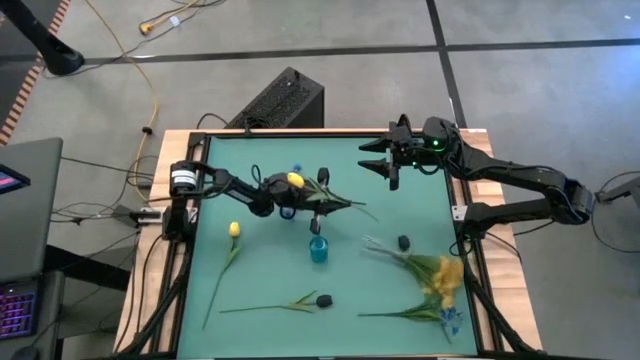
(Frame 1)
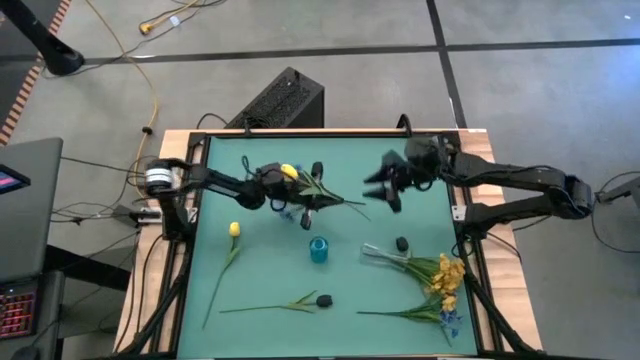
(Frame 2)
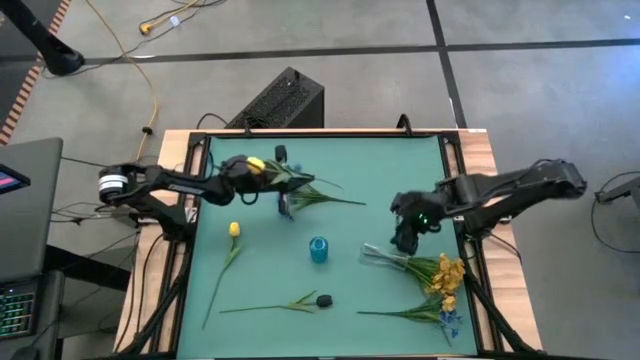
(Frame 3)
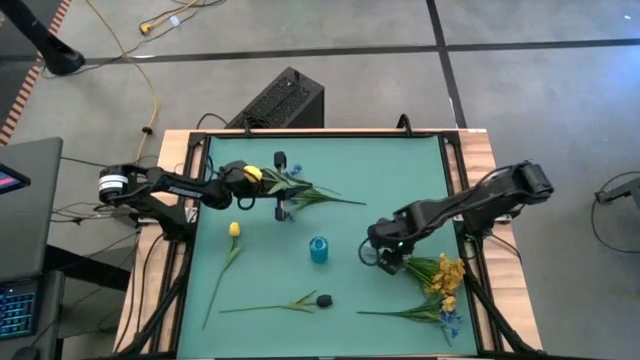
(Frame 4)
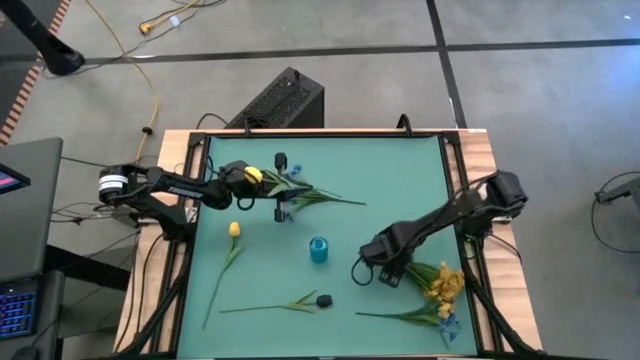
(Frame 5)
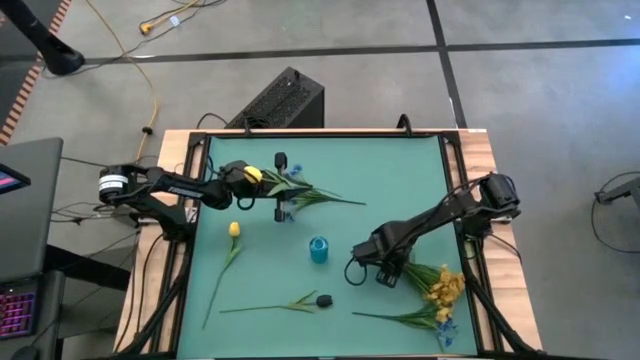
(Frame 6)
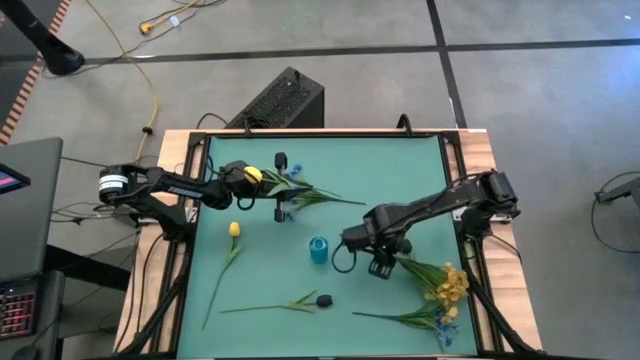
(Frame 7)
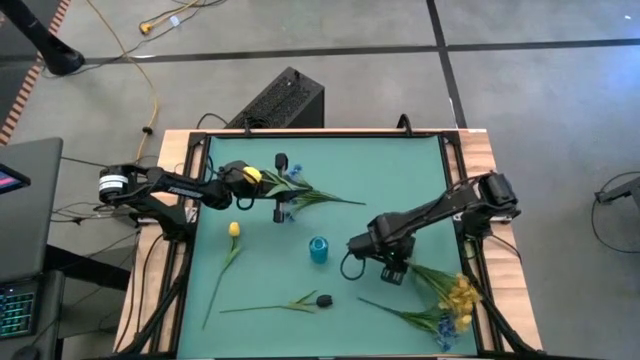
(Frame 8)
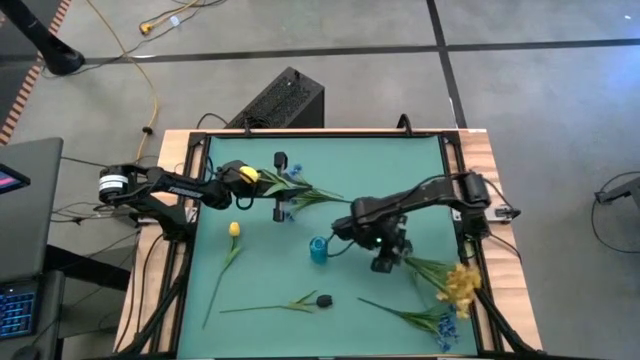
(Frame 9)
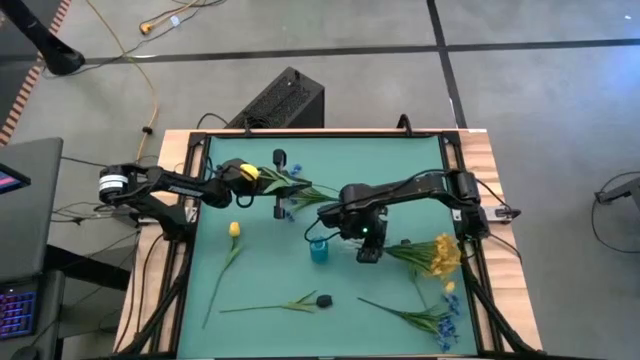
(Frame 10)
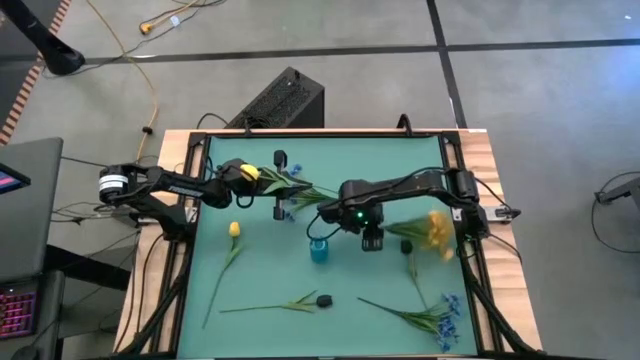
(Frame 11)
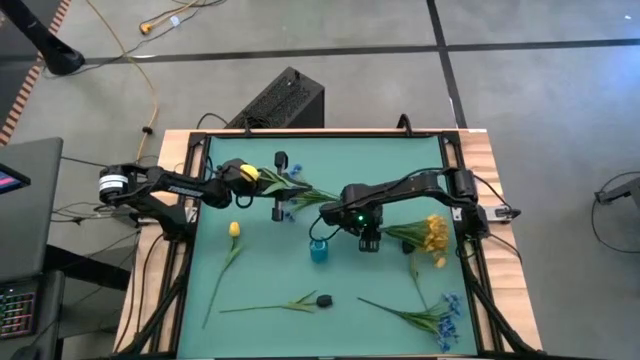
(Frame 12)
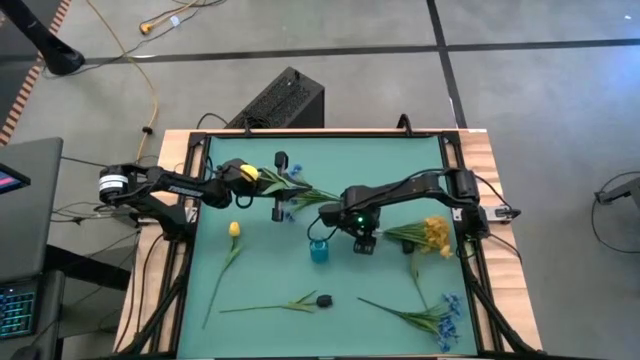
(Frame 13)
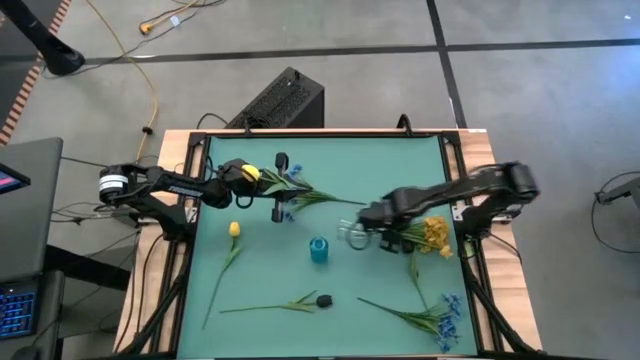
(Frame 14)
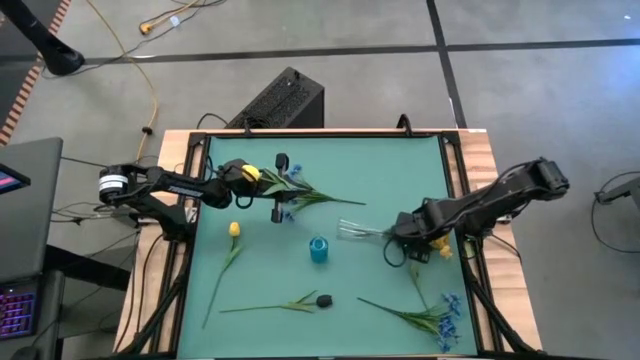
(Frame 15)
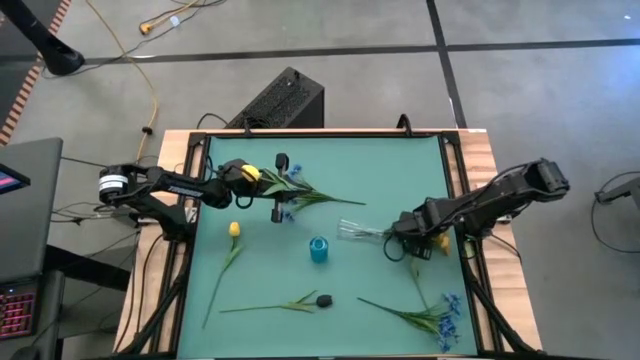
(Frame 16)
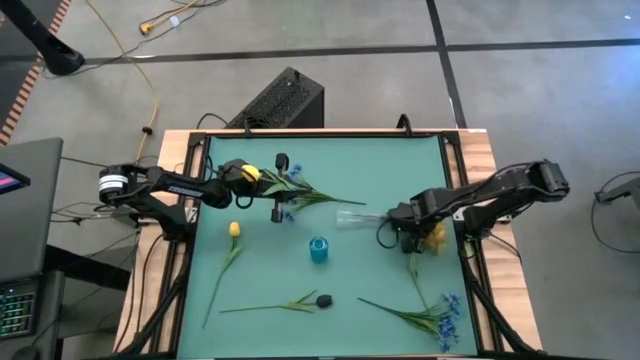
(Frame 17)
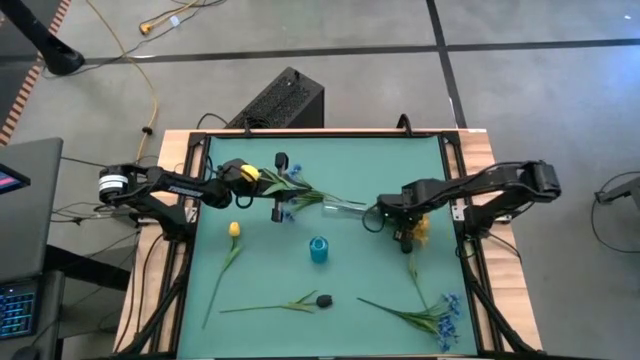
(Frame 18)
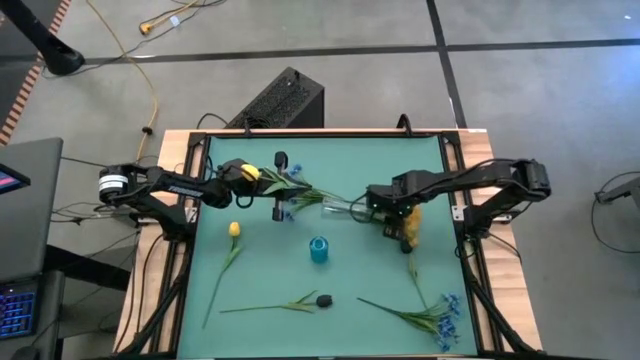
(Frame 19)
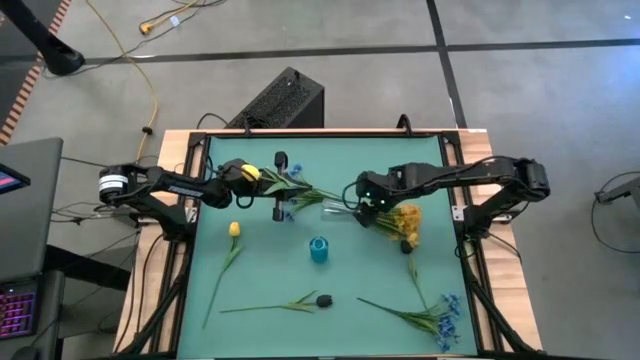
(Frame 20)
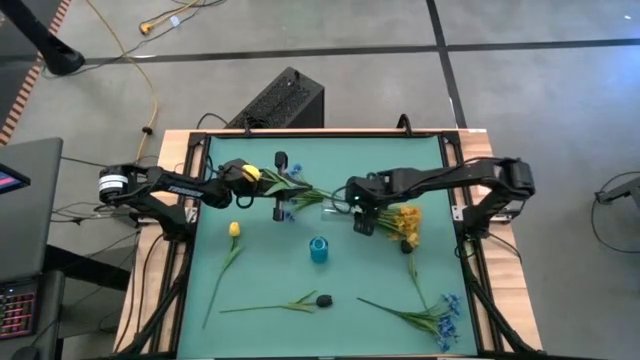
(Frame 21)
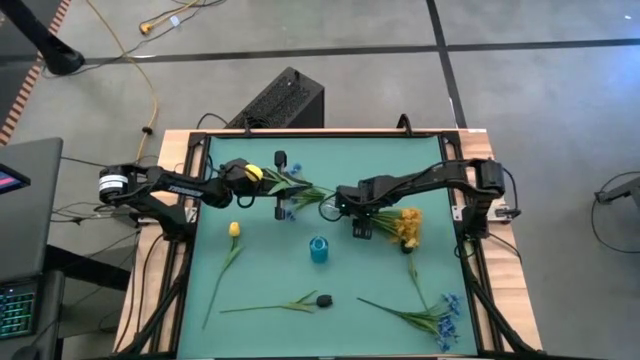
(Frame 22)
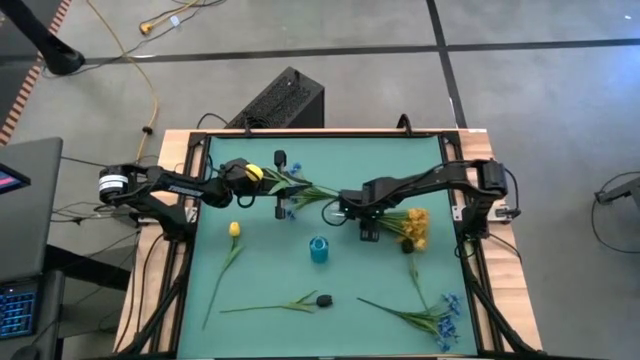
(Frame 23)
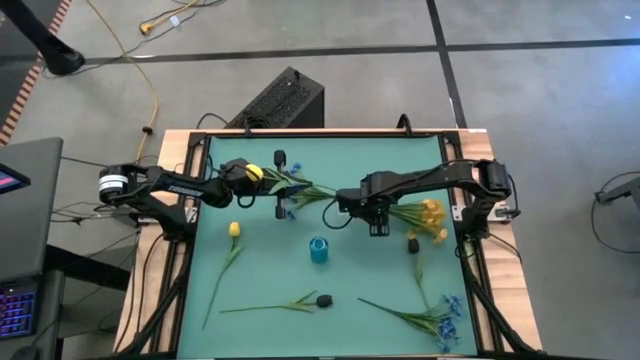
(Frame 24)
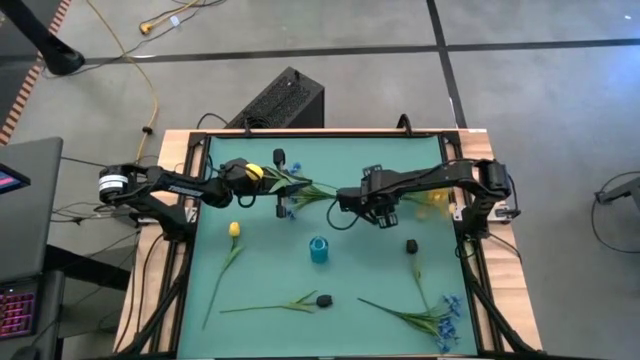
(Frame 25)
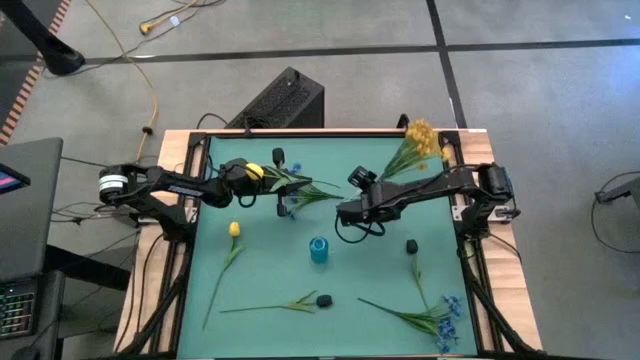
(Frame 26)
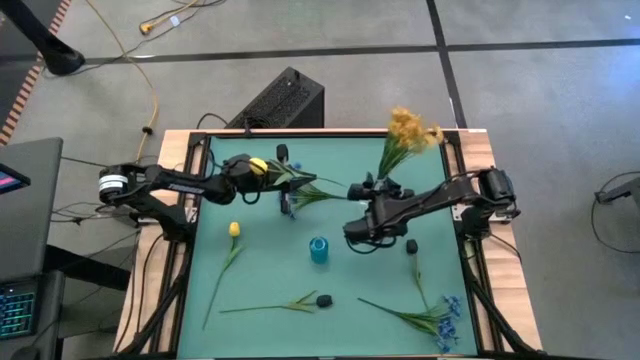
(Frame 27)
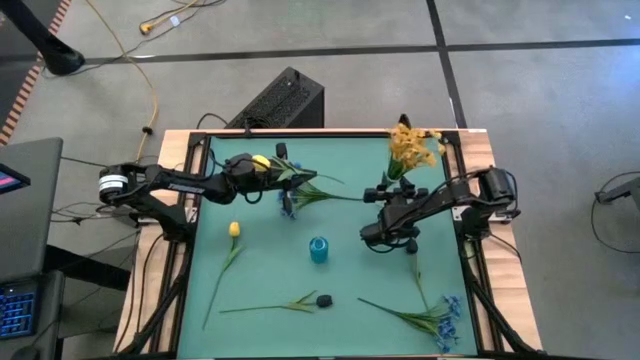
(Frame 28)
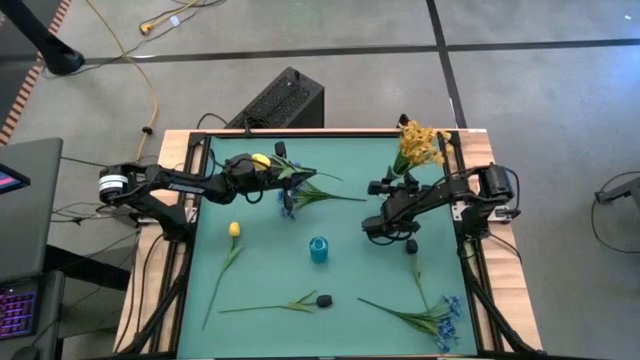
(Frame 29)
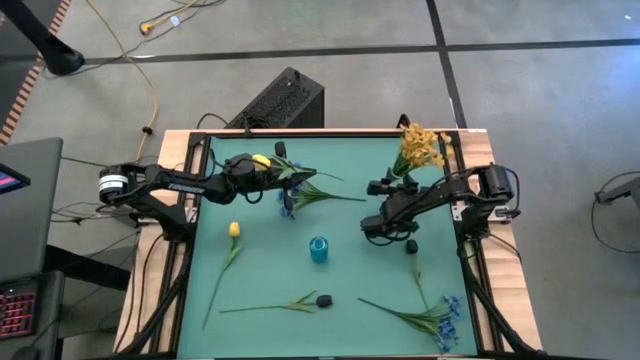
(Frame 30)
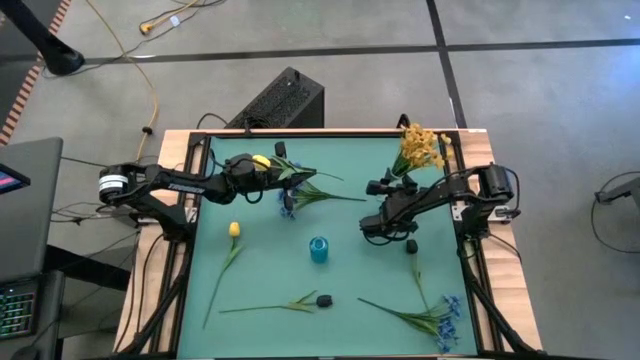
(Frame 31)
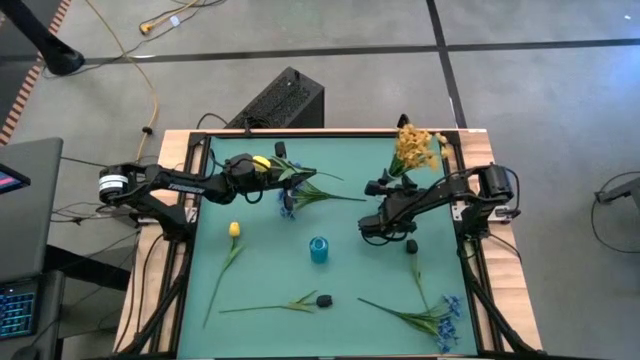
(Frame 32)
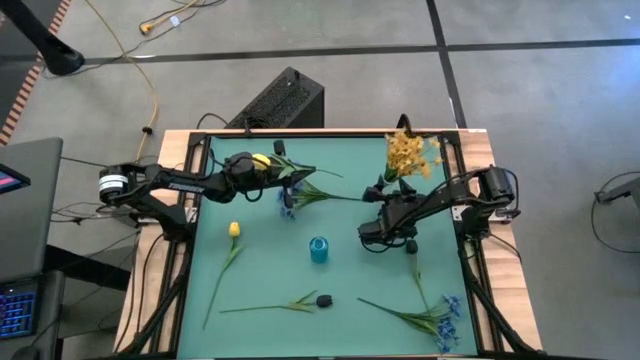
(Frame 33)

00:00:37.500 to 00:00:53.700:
Task: Sort flowers into vase by color
Put the top yellow tulip into the transparent vase

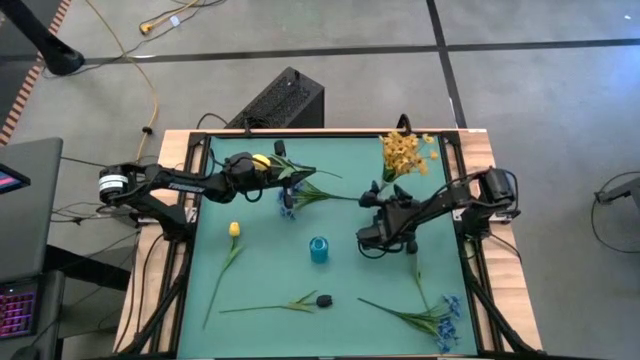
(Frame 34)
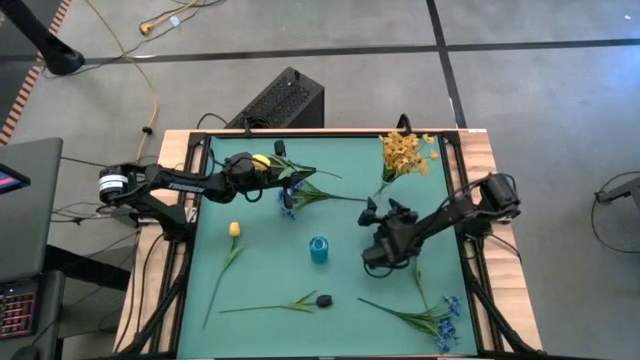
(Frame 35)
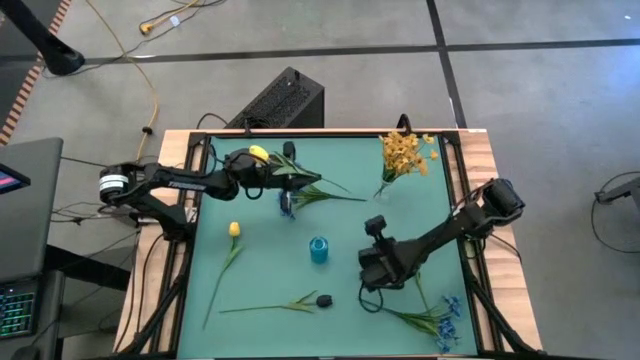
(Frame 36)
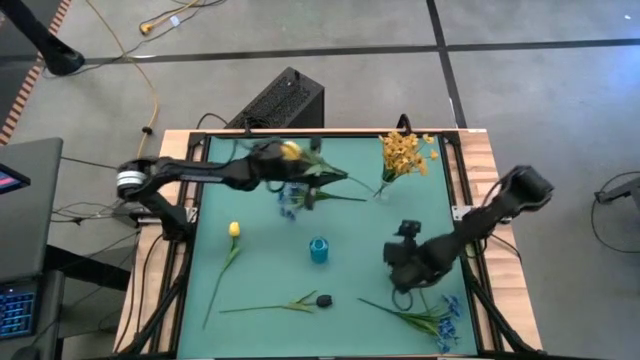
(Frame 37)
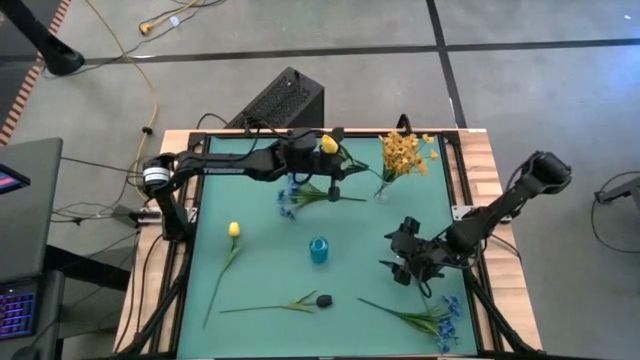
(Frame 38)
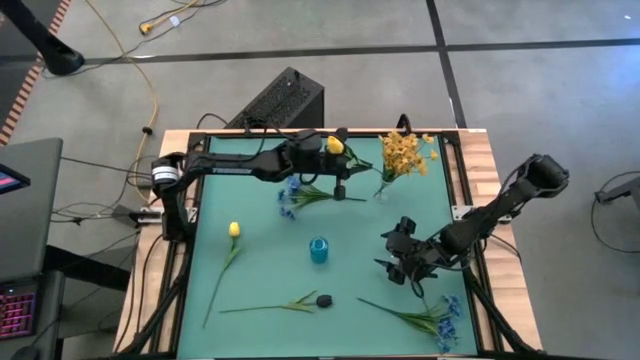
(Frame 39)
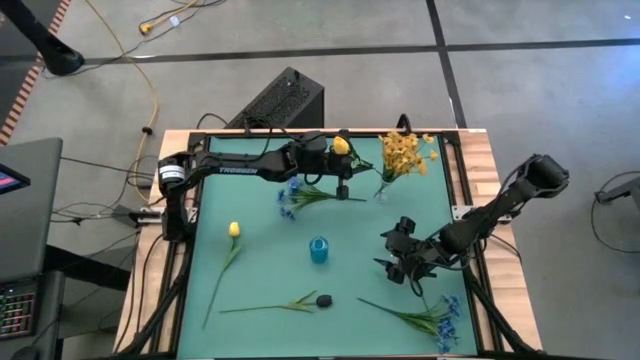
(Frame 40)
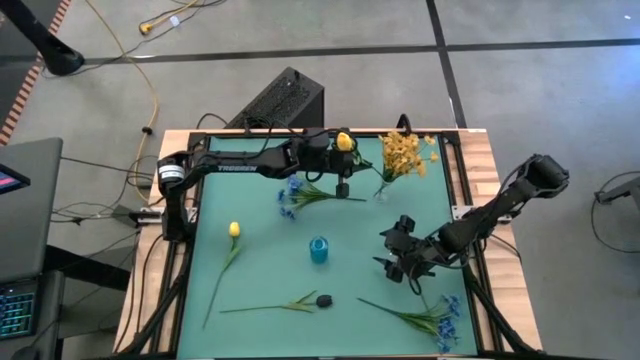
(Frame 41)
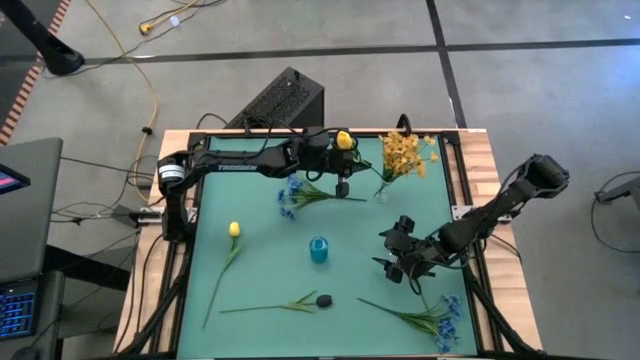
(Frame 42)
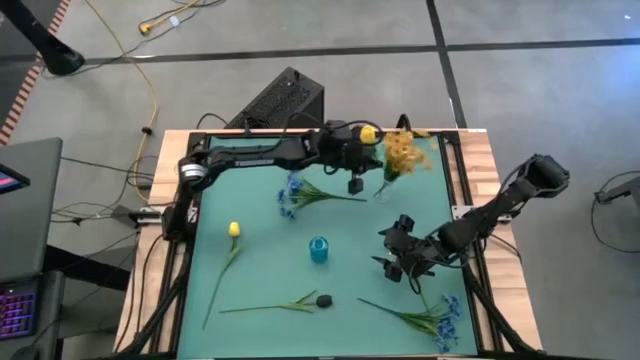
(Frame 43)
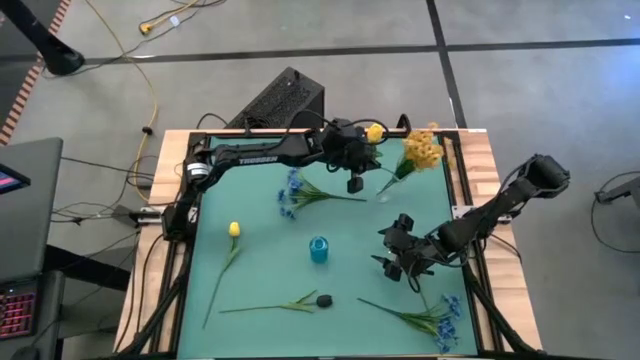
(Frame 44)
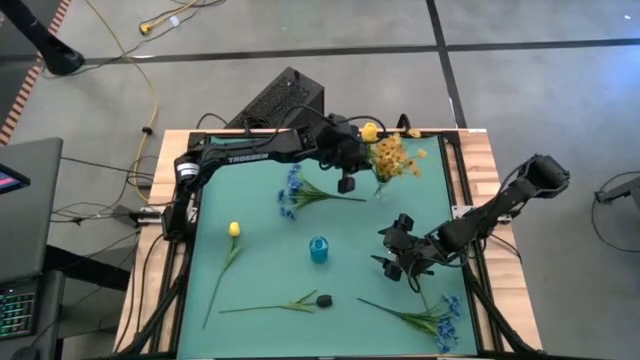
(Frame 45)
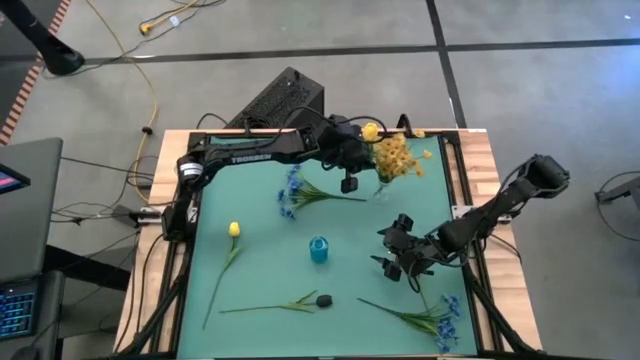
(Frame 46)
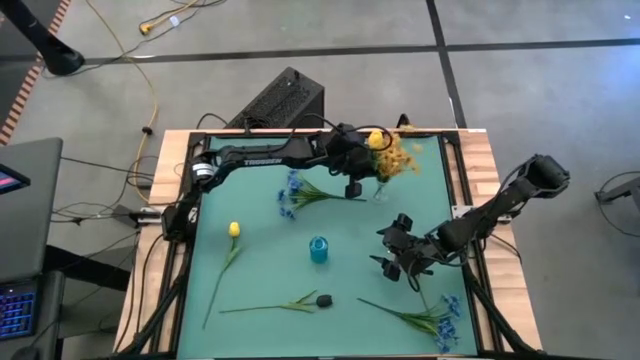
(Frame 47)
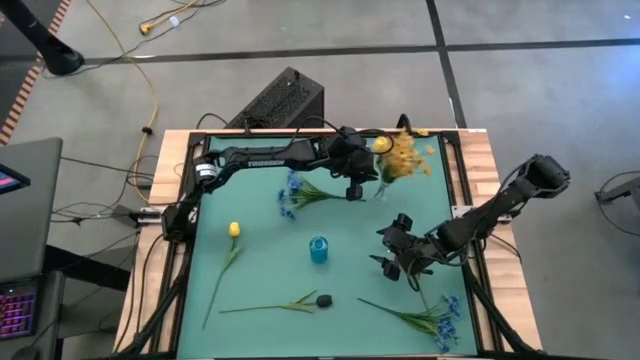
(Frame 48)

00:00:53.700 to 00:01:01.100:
Put the top yellow tulip into the transparent vase
